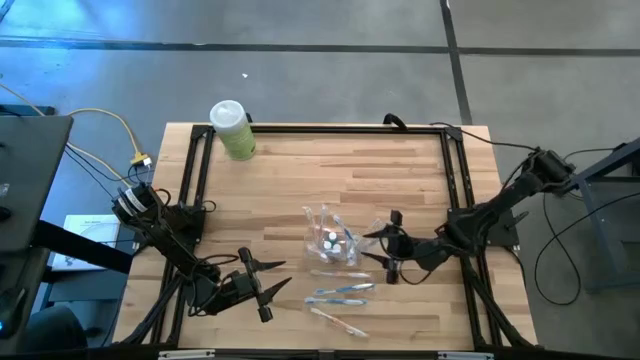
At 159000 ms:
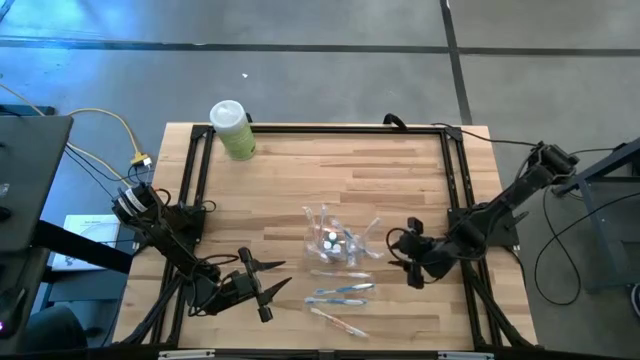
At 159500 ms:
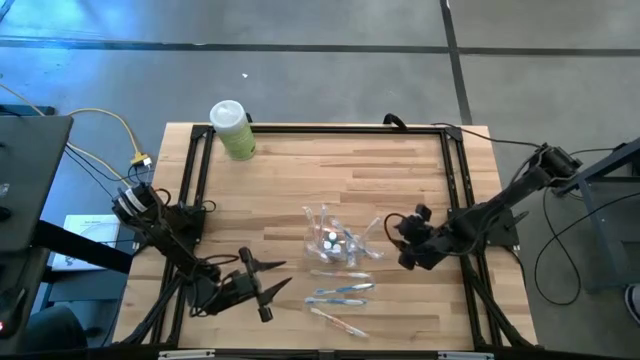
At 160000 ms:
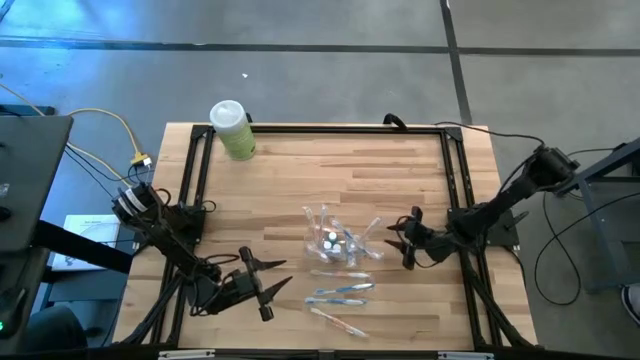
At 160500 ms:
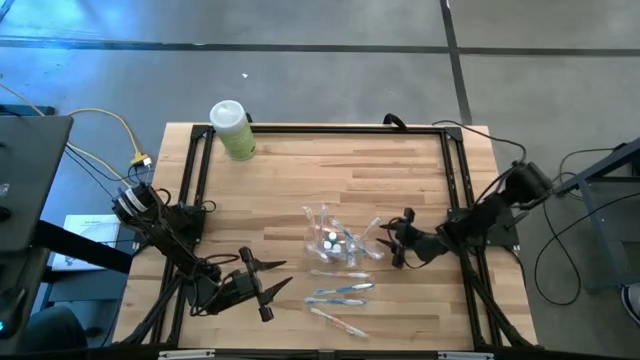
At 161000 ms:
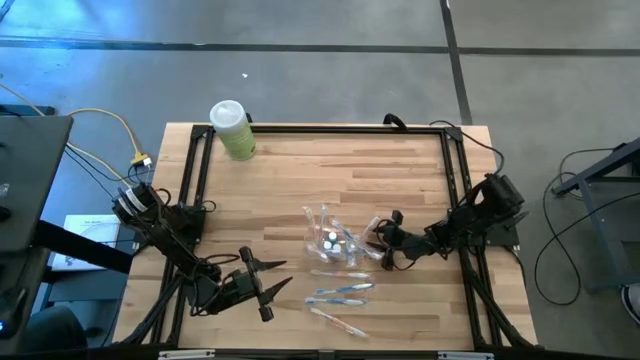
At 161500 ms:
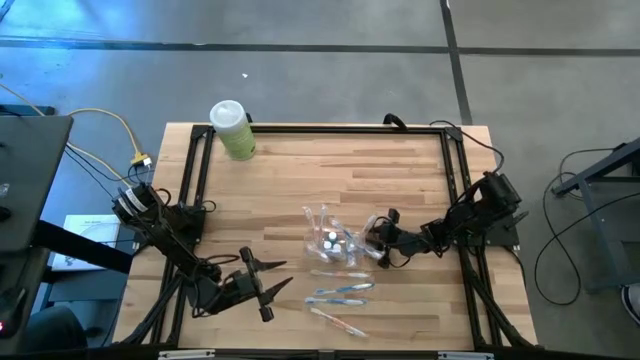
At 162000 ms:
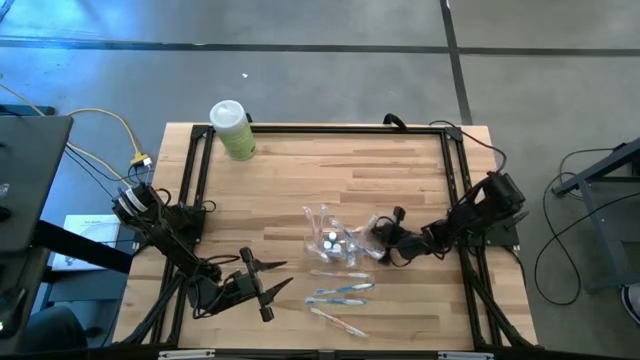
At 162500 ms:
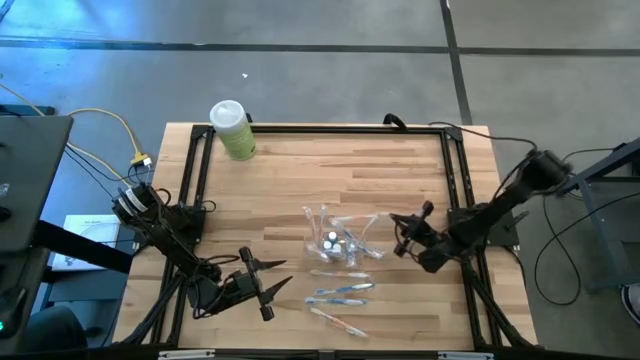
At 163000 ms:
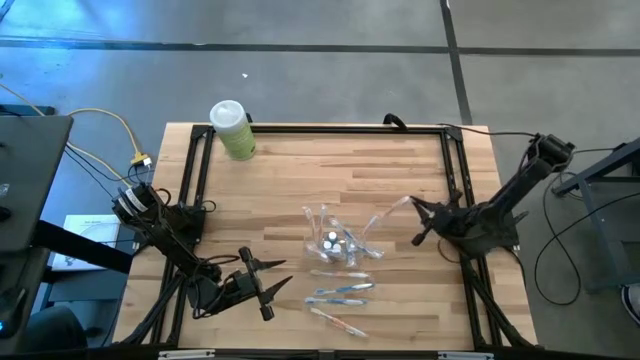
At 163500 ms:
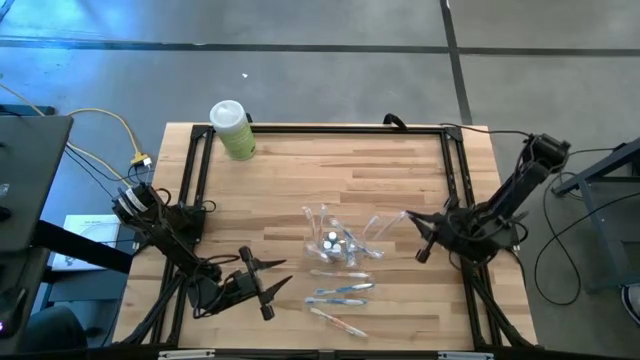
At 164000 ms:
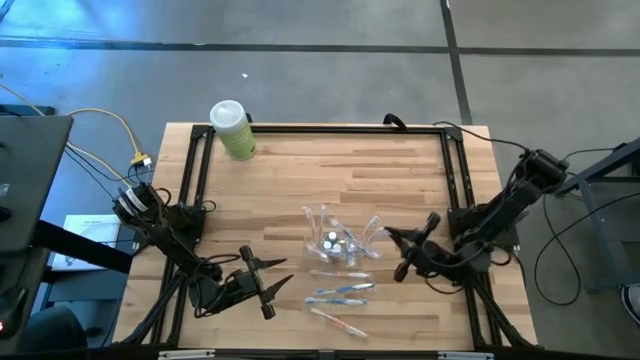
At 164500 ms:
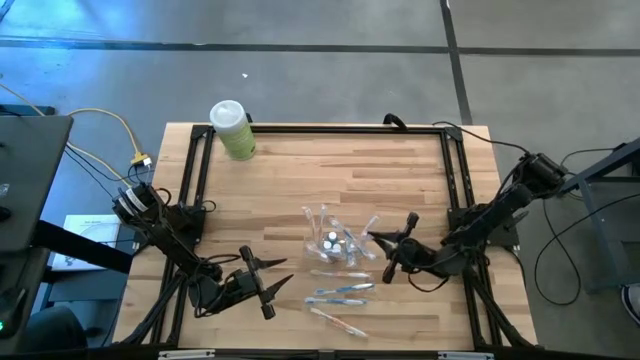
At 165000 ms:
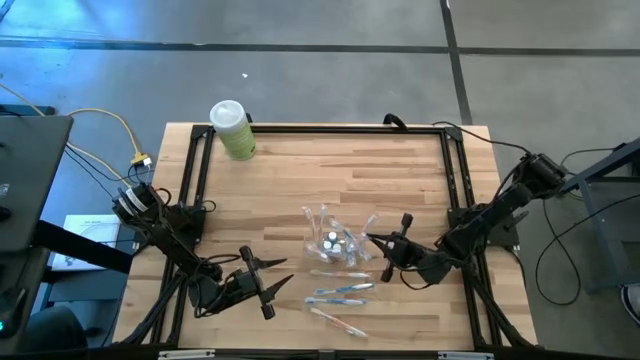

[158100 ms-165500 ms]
Task: Pick & Place toothbrushing station
Put the orange toothbrush into the transparent organizer

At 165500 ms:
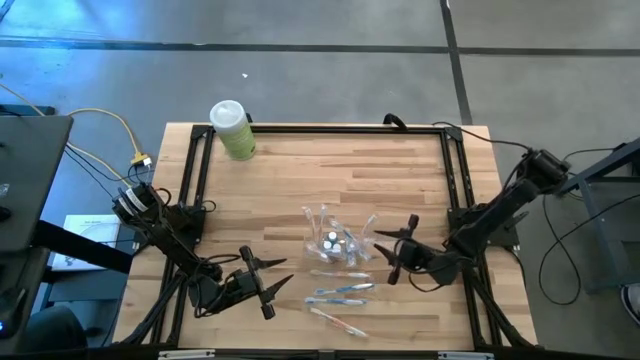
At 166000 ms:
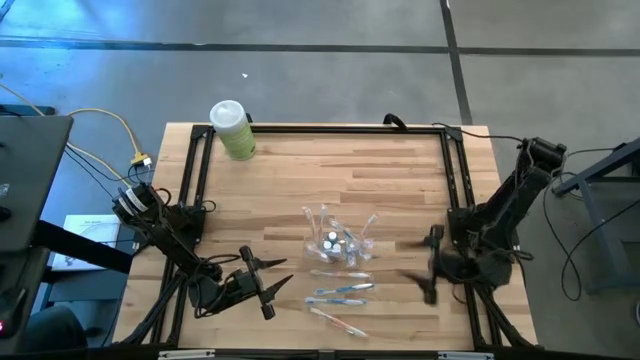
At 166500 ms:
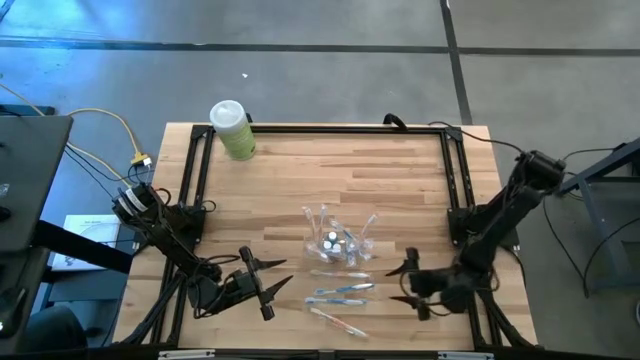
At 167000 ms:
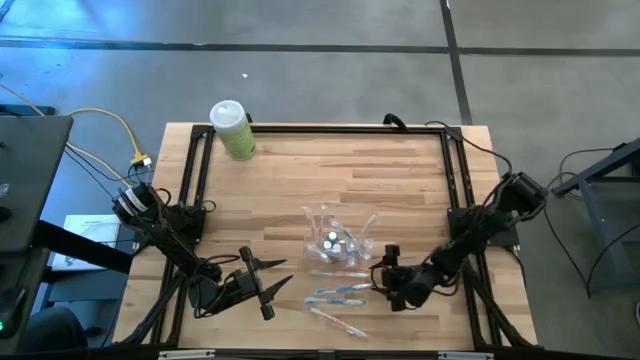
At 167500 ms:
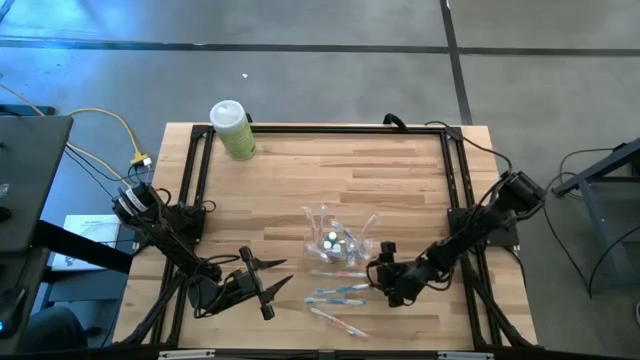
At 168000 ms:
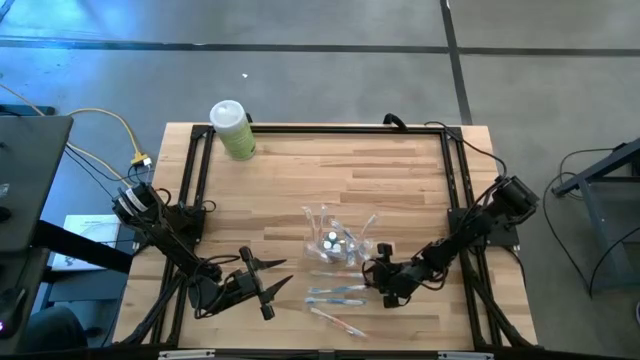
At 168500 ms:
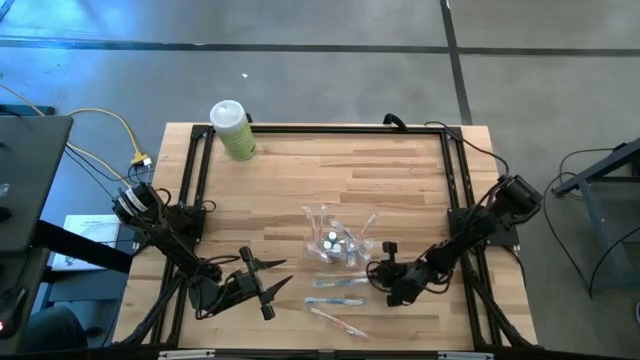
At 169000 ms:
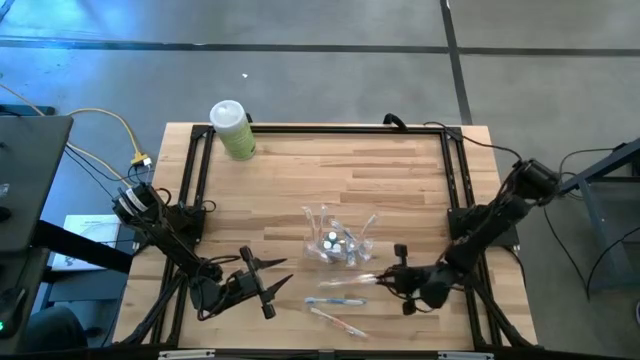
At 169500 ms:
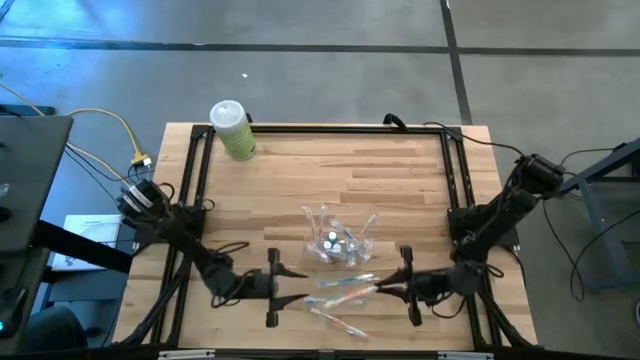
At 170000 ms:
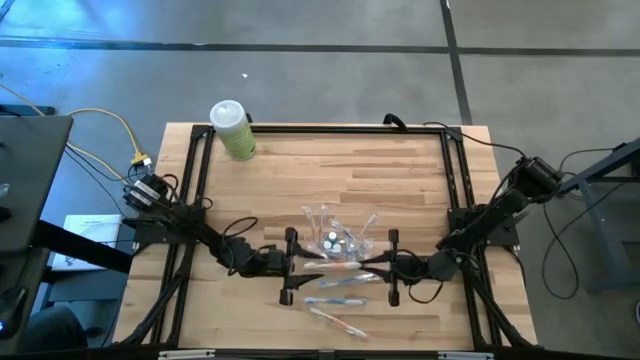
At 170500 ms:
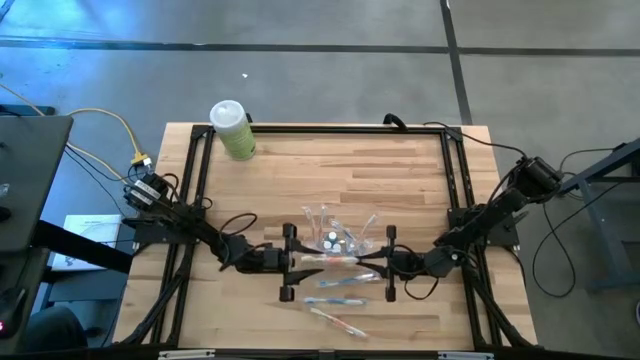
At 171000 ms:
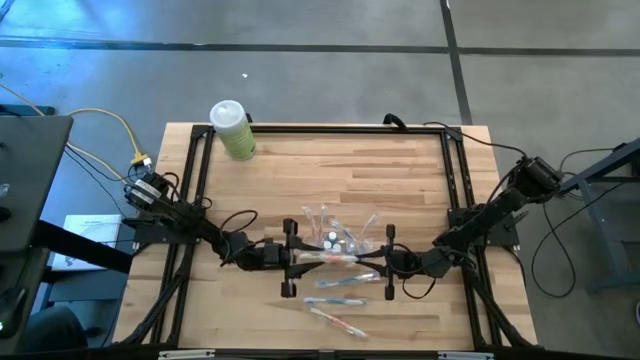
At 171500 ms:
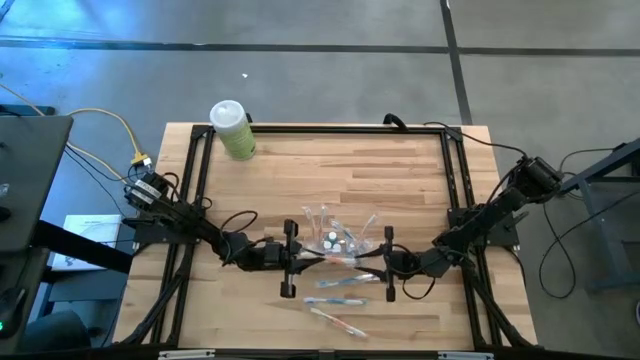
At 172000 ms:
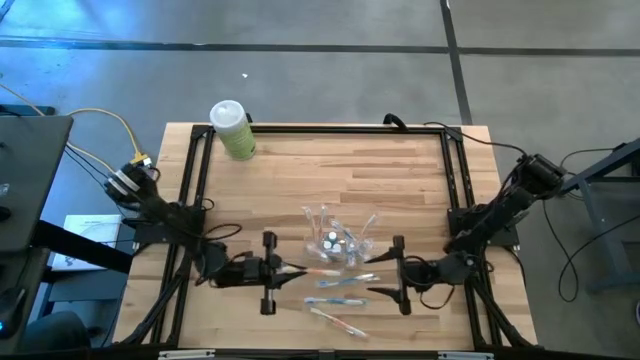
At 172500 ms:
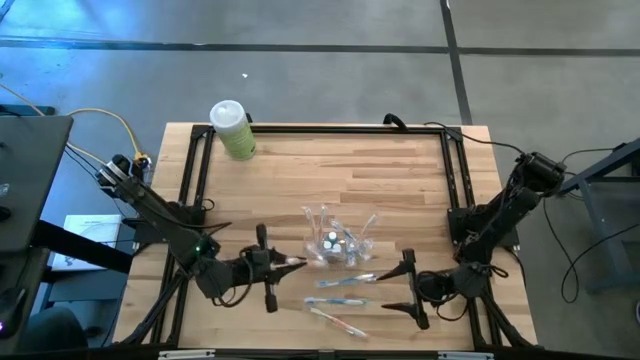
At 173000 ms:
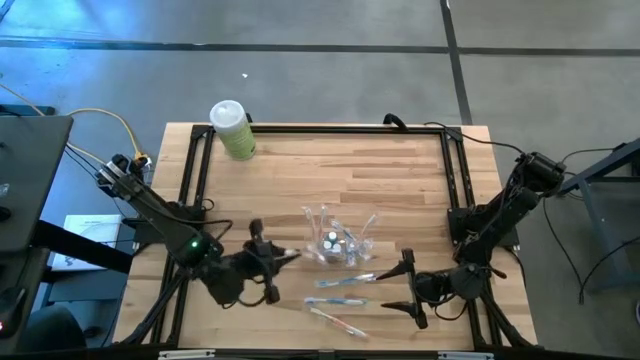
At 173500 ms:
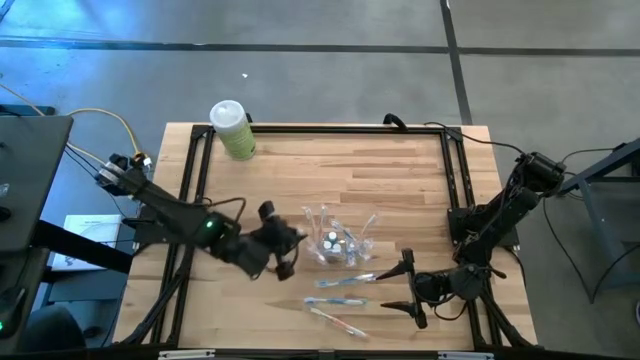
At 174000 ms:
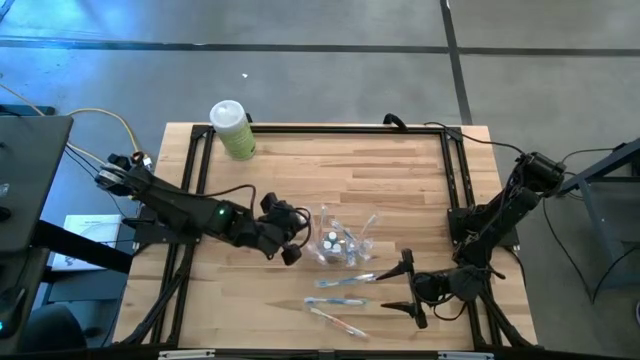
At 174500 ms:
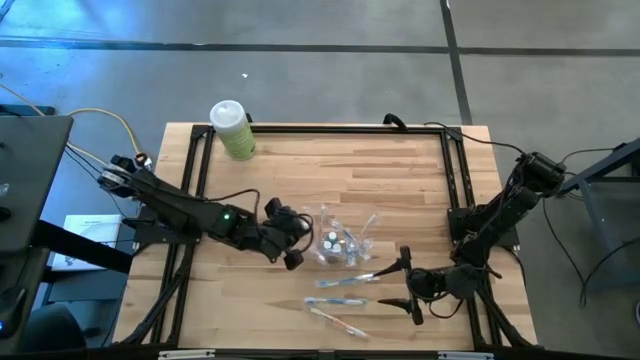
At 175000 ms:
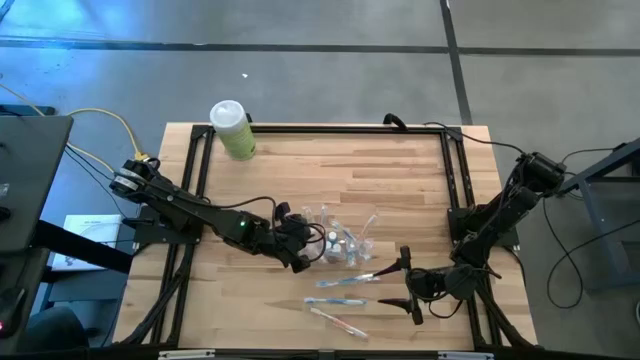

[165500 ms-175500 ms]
Put the orange toothbrush into the transparent organizer

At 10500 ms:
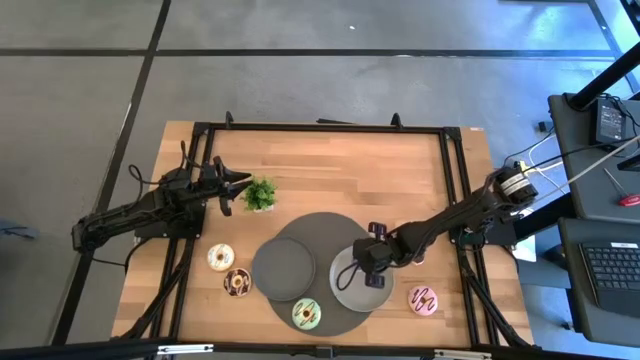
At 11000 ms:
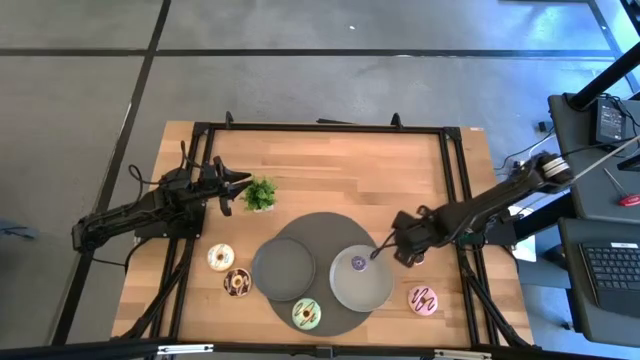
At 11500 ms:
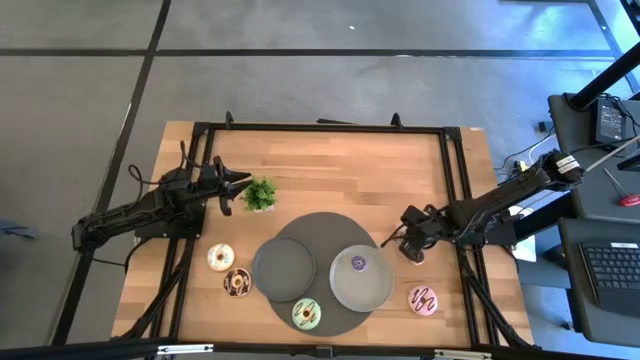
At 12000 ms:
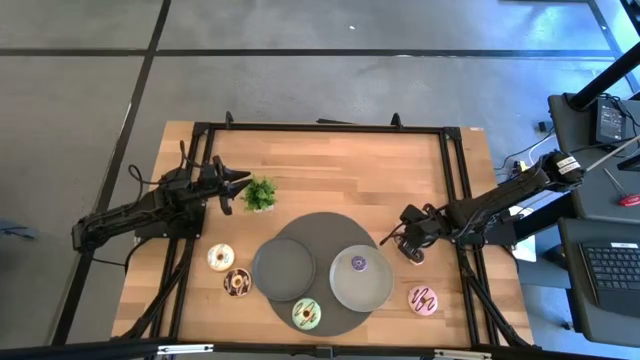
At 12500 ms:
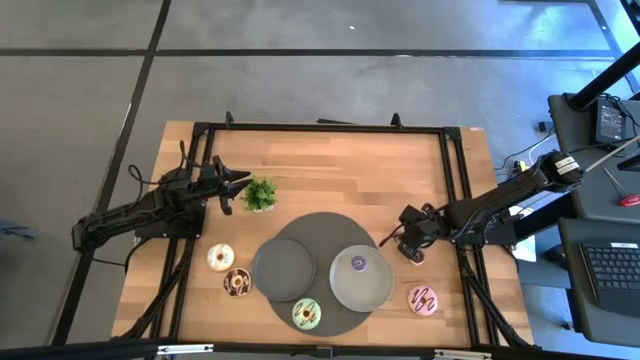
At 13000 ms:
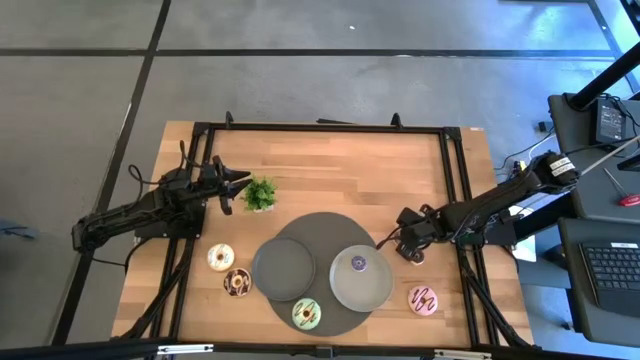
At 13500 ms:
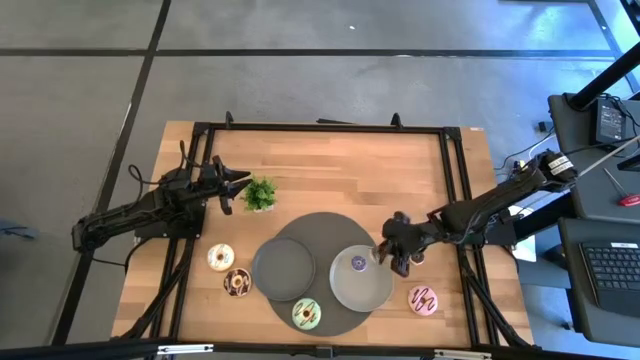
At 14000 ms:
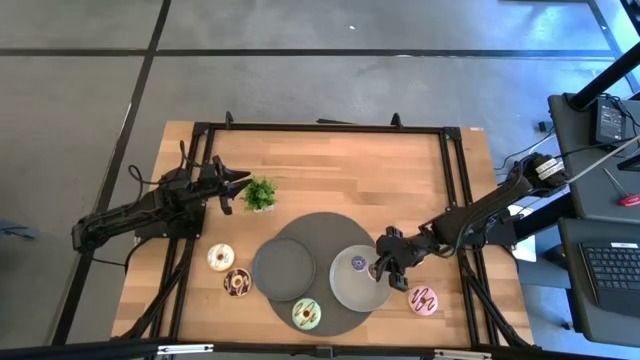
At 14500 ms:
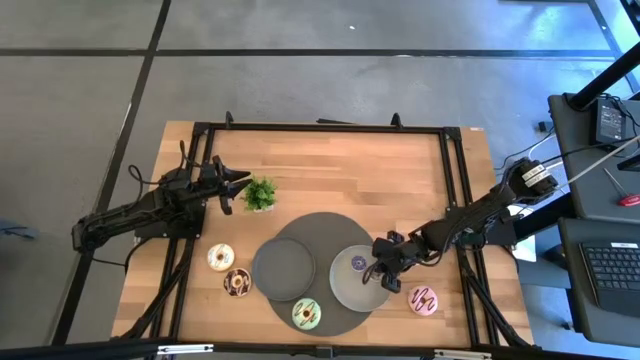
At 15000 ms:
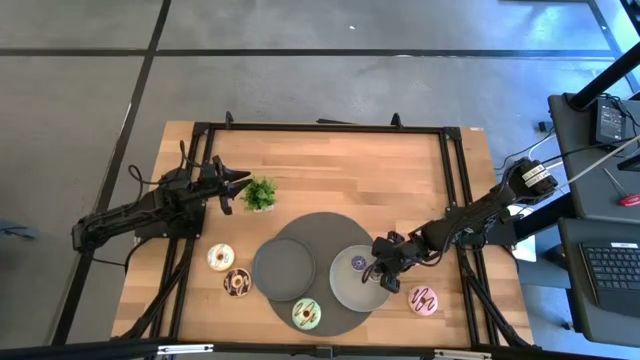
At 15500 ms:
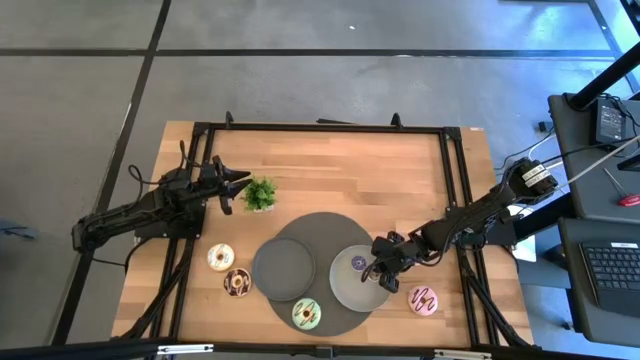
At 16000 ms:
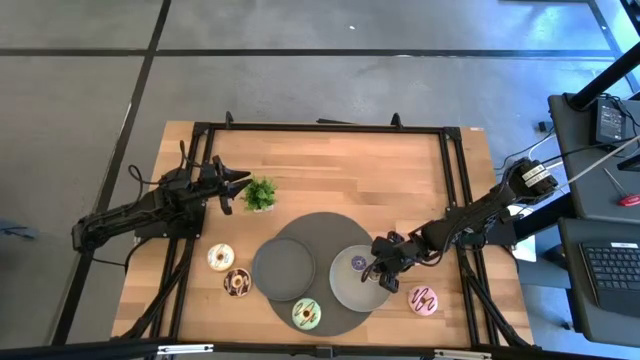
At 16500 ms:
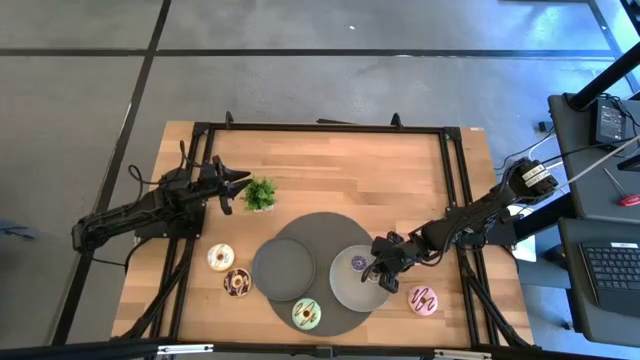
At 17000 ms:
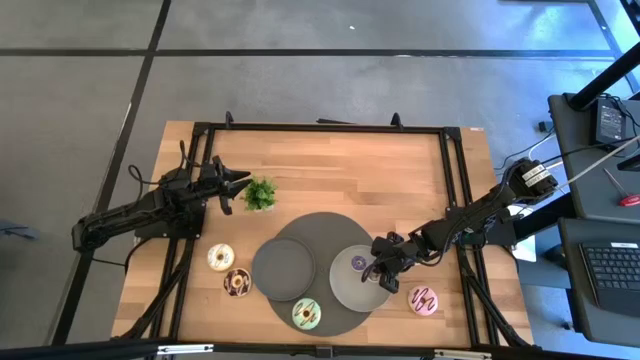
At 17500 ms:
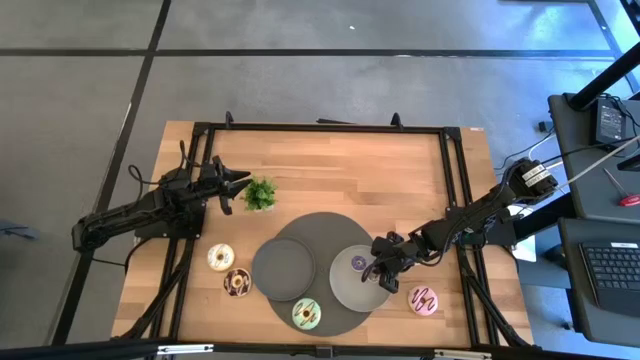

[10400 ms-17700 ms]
Task: Pick & Place donuts
Put the small brown donut on the light gray plate
